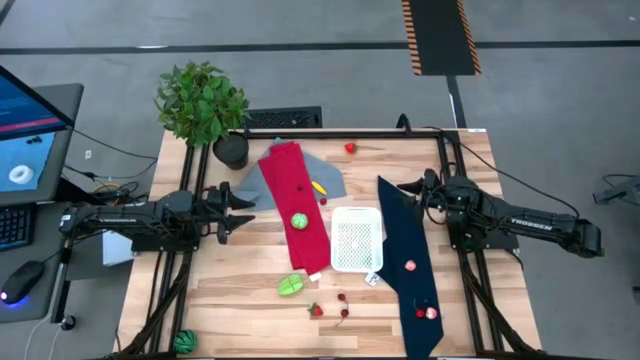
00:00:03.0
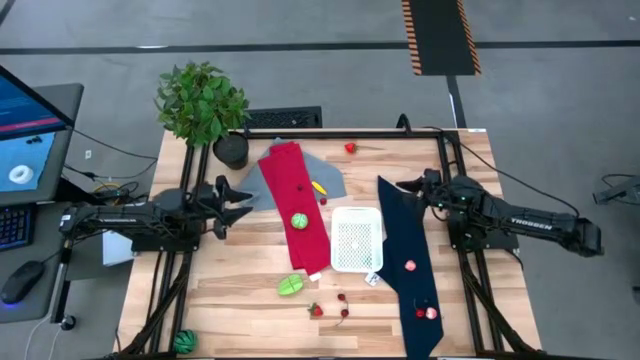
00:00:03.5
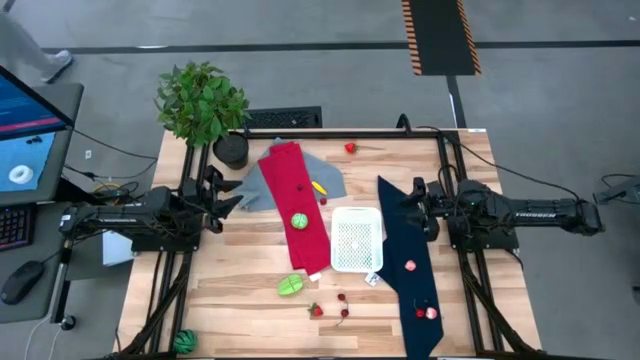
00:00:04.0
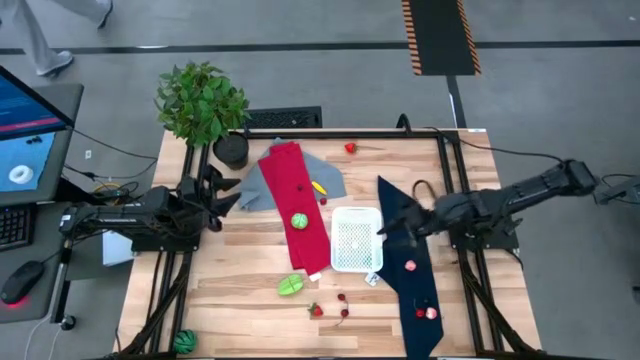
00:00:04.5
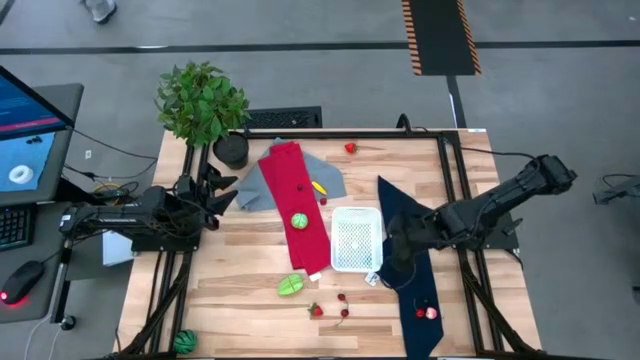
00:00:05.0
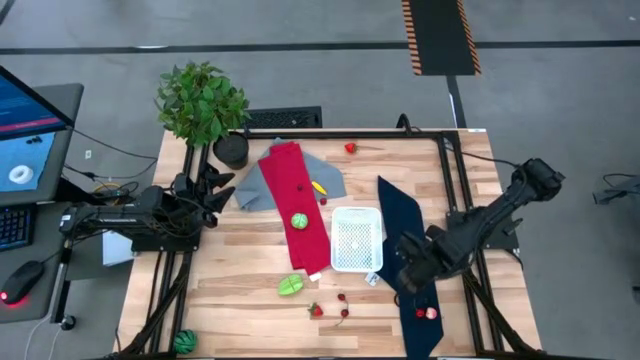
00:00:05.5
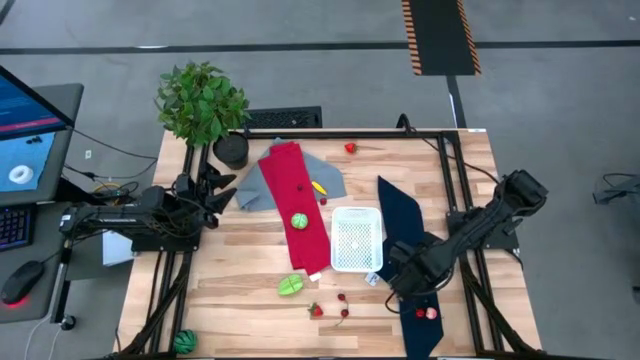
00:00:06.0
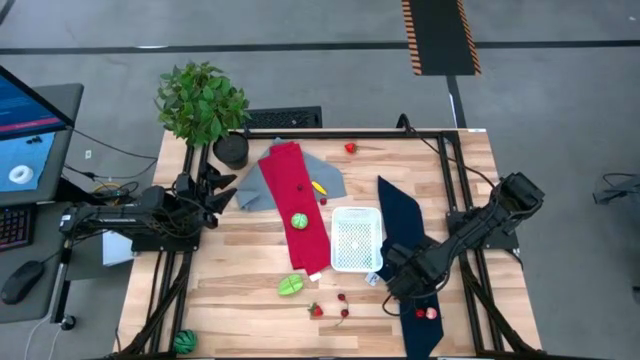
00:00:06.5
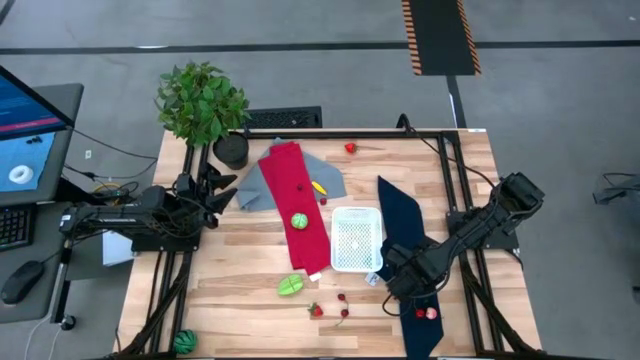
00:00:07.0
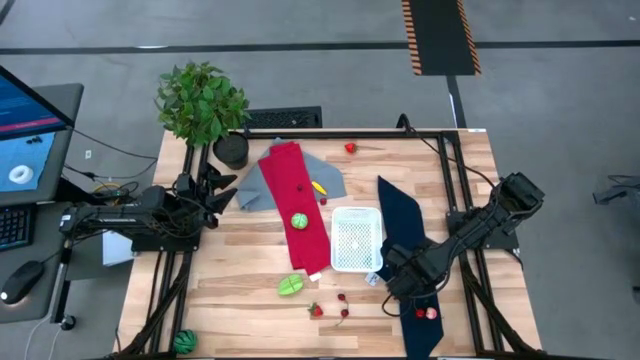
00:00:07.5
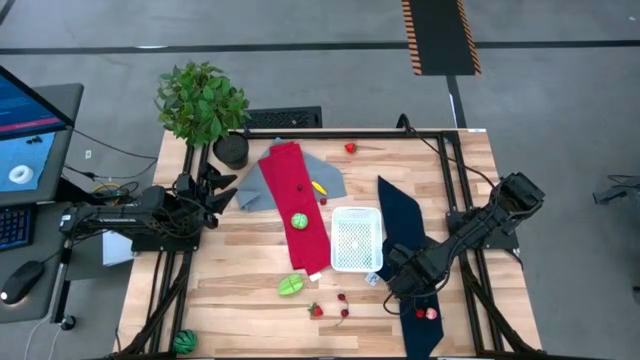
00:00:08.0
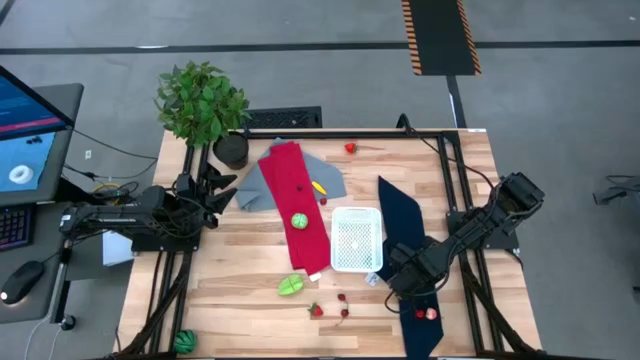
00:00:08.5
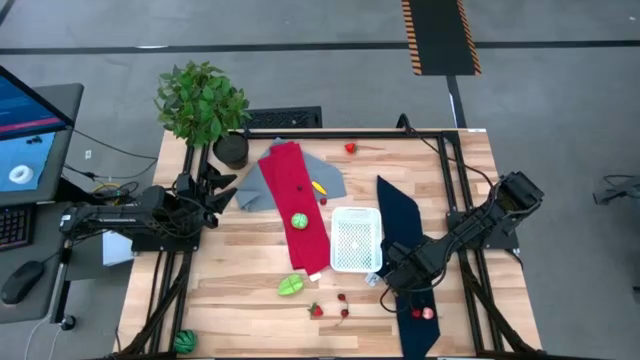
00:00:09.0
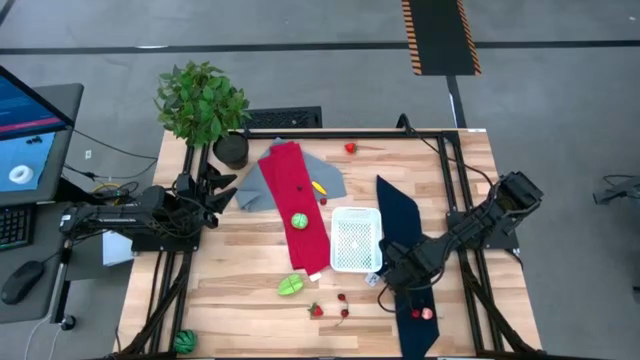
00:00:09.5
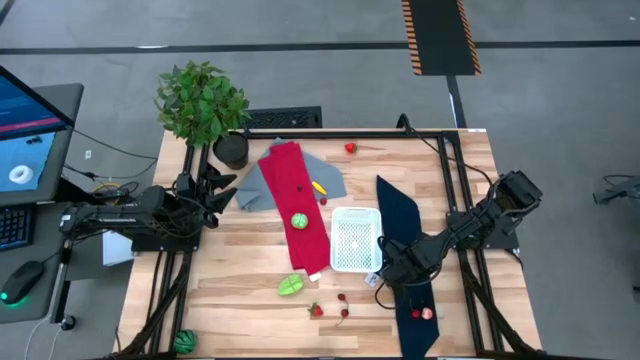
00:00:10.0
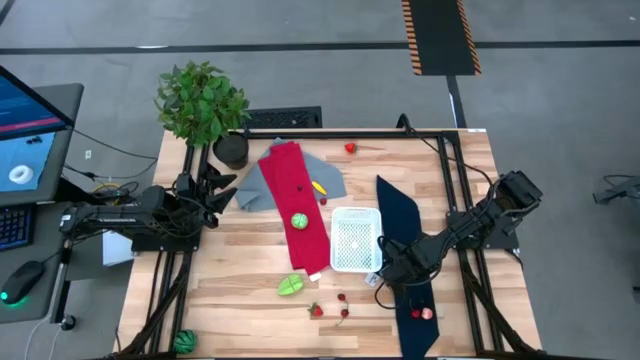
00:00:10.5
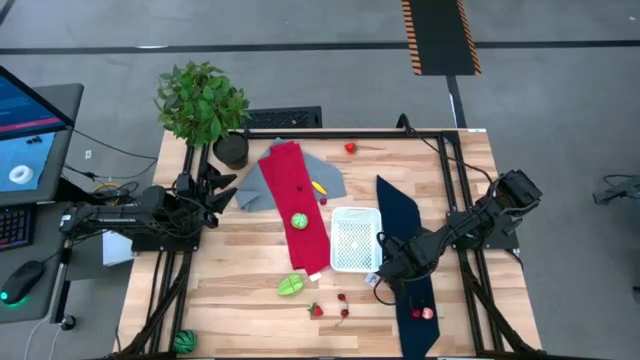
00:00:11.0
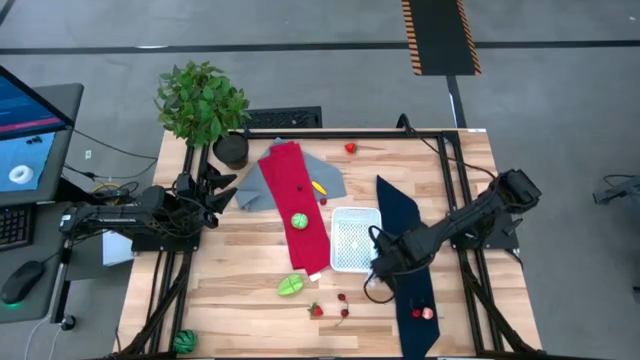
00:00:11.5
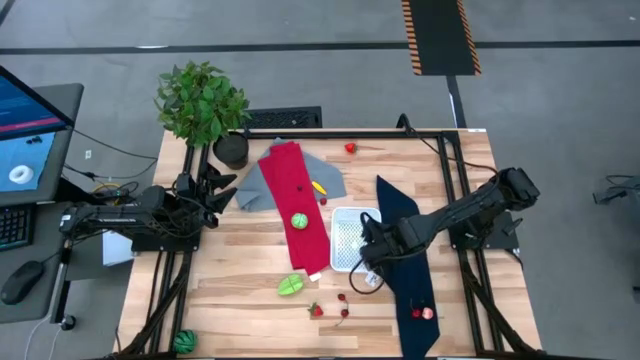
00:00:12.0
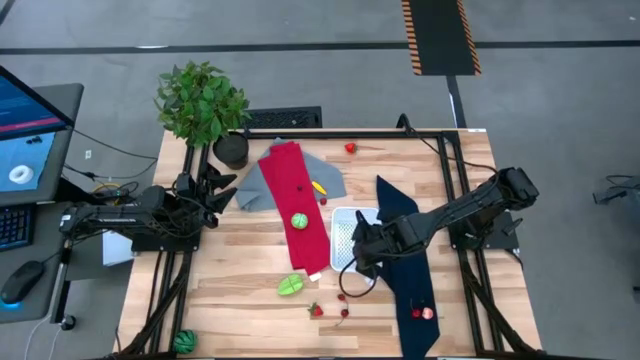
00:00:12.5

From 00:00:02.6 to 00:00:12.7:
Task: Pick and placing Produce into tupperware
Put the peach into the white bin

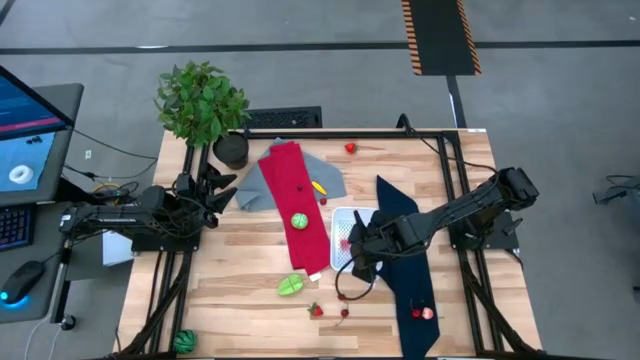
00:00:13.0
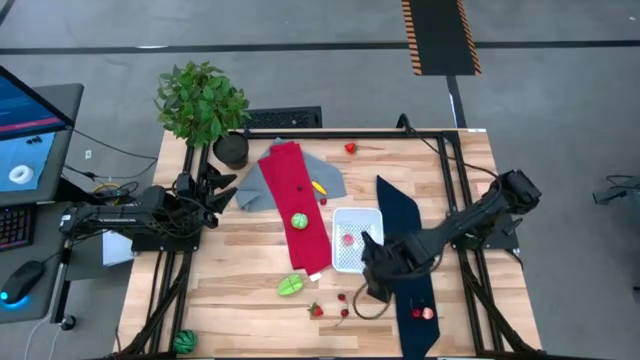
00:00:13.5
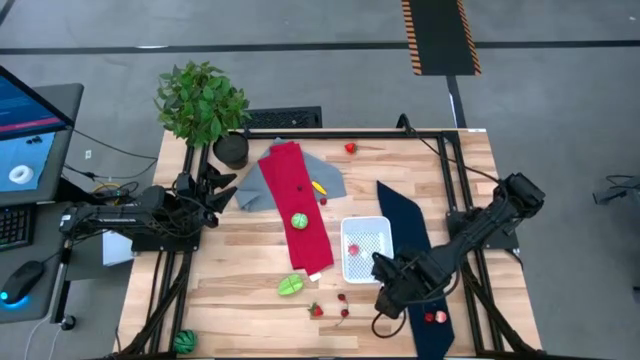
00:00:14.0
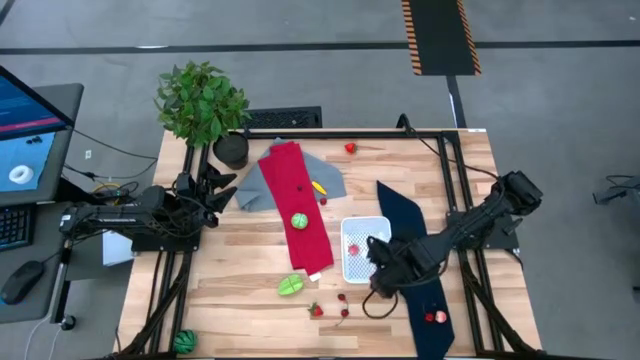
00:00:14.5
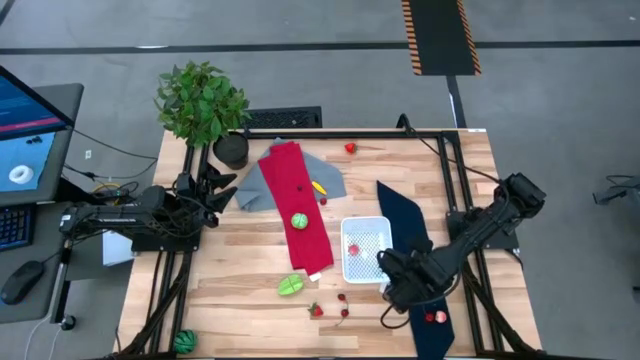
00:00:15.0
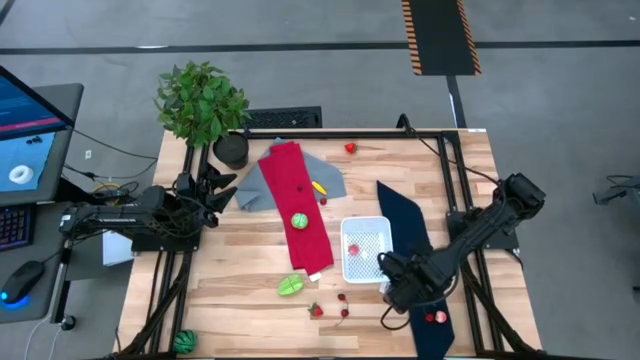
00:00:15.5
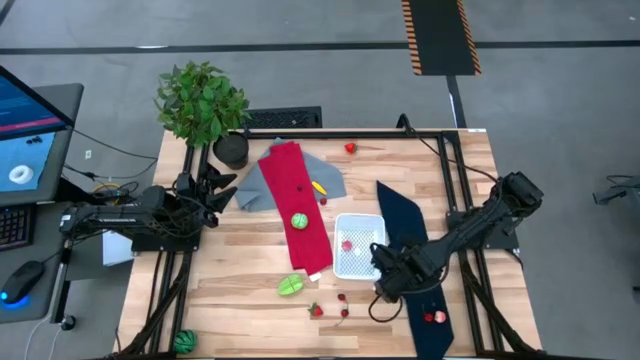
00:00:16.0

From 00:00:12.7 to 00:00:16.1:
Adjust the white bin

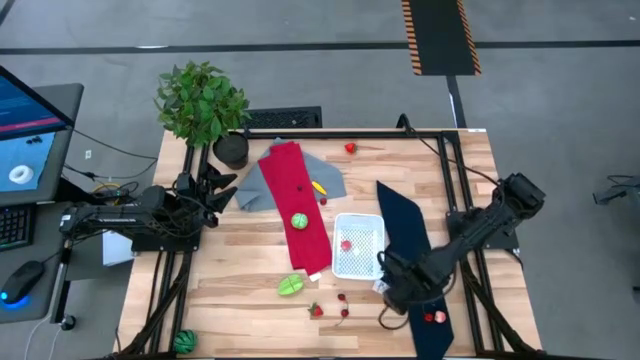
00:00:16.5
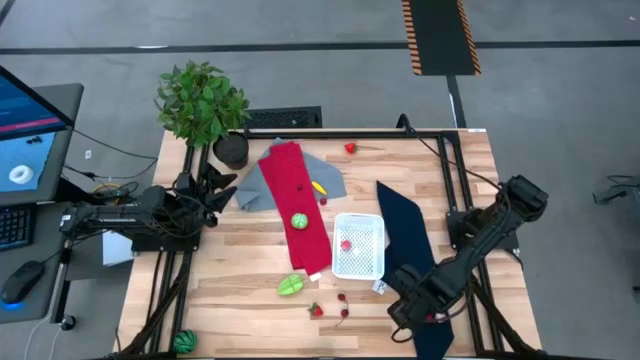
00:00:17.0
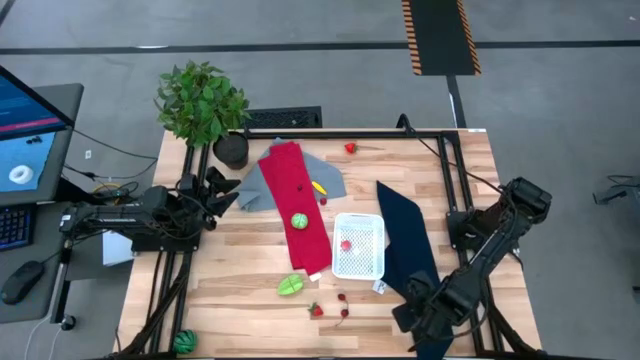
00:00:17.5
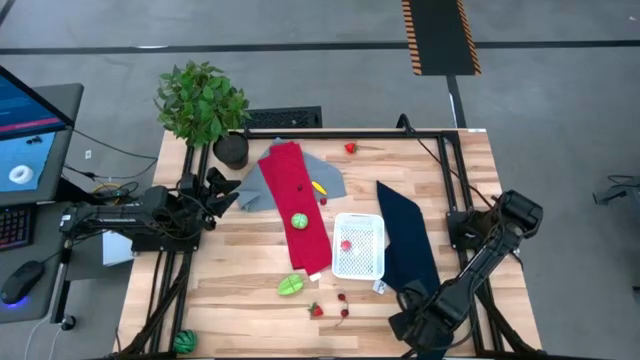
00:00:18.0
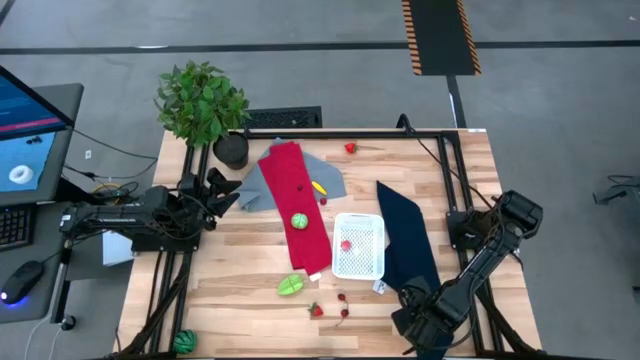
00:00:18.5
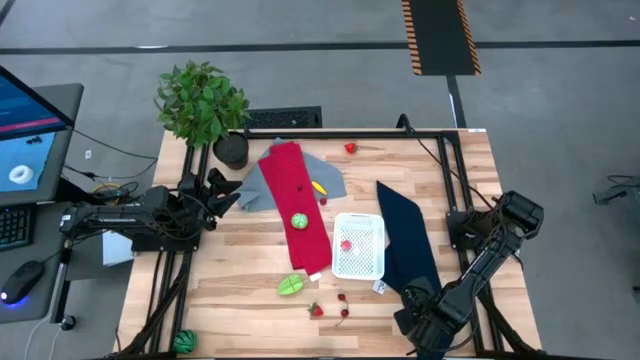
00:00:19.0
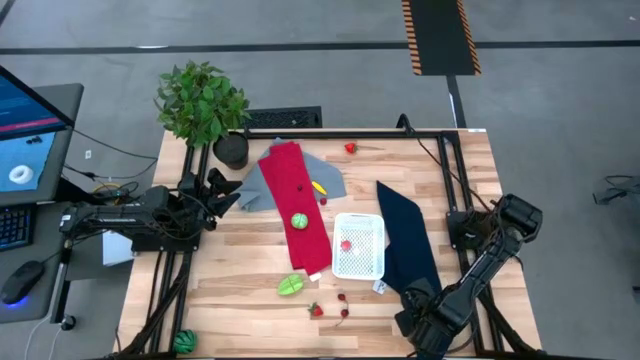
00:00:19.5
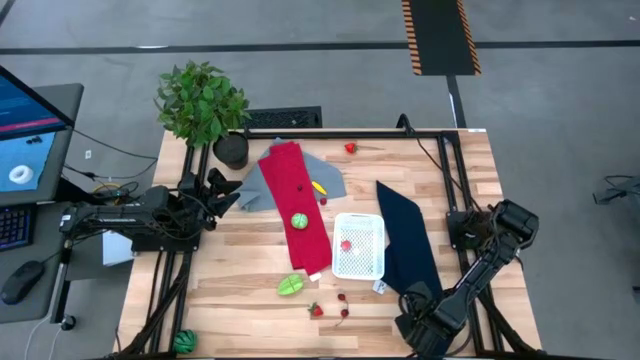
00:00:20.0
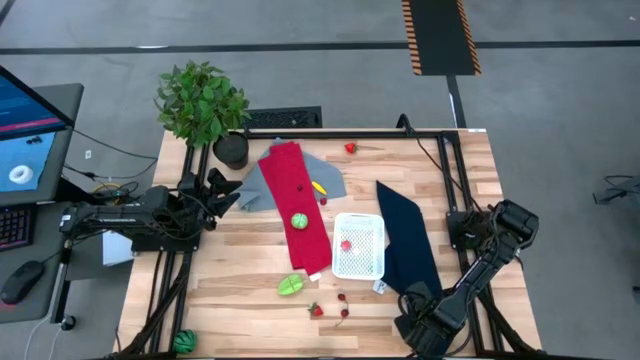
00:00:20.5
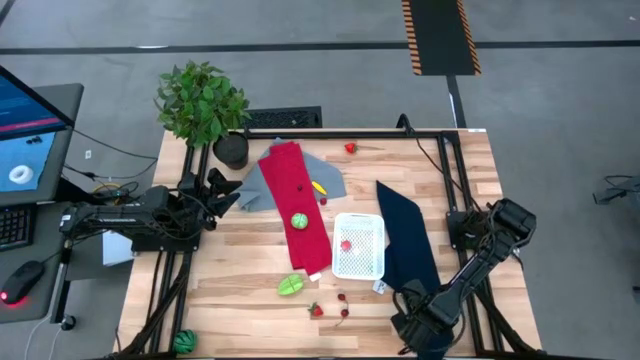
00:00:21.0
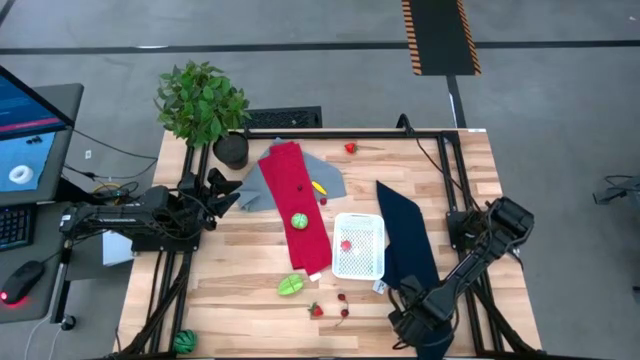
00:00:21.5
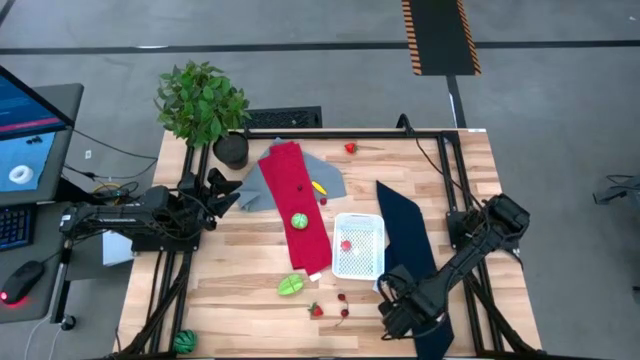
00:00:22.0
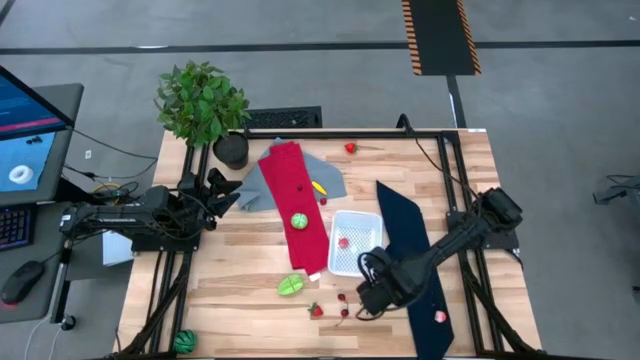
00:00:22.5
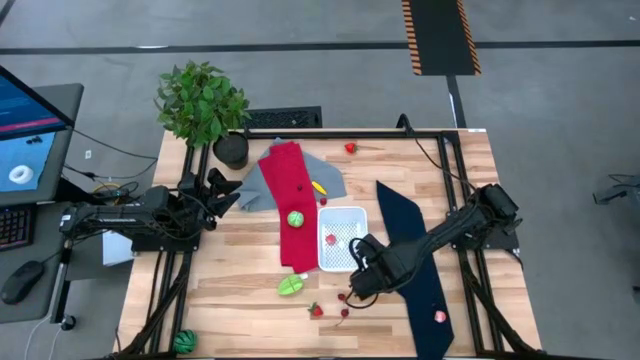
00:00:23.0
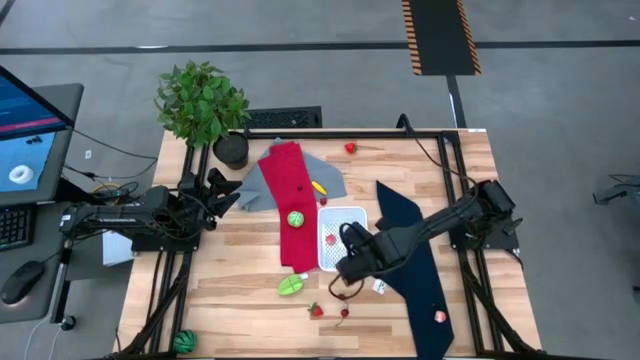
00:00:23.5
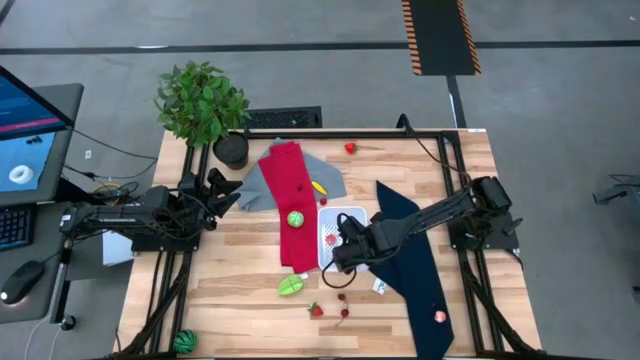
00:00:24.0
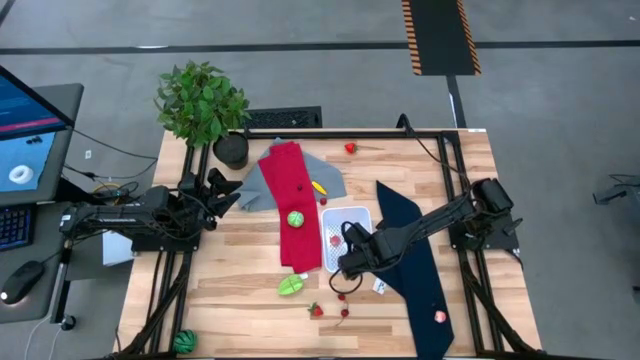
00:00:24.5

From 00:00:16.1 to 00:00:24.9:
Put the cherry into the white bin
